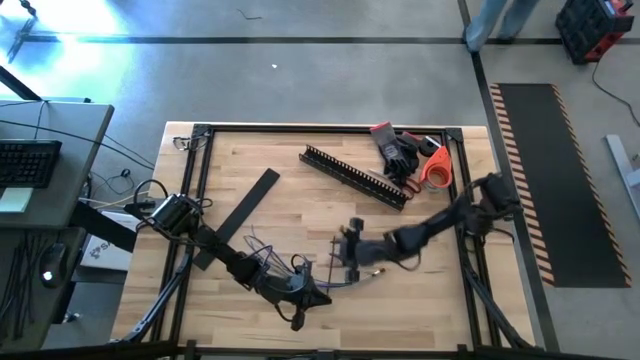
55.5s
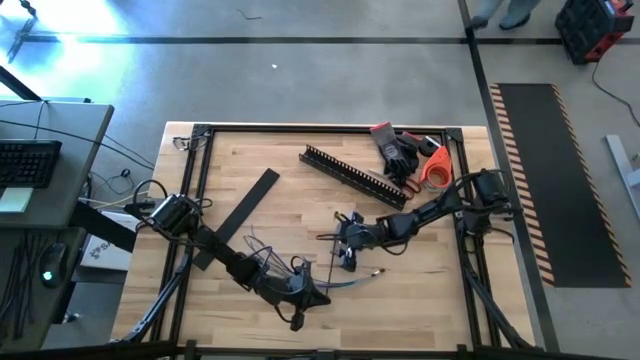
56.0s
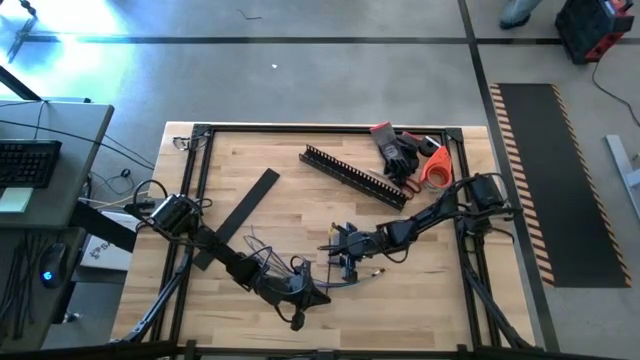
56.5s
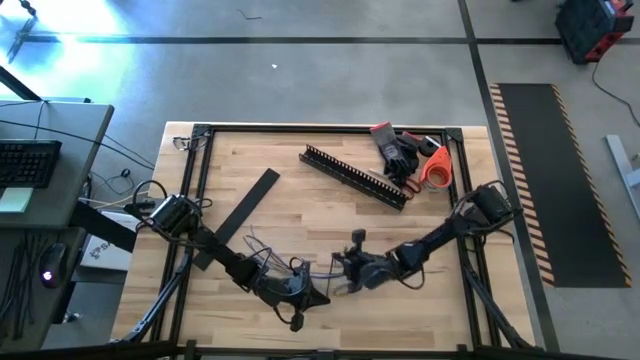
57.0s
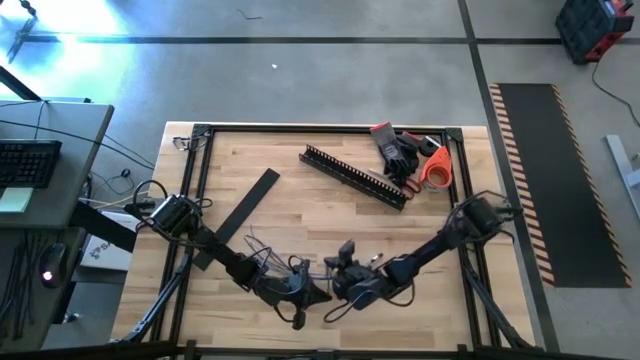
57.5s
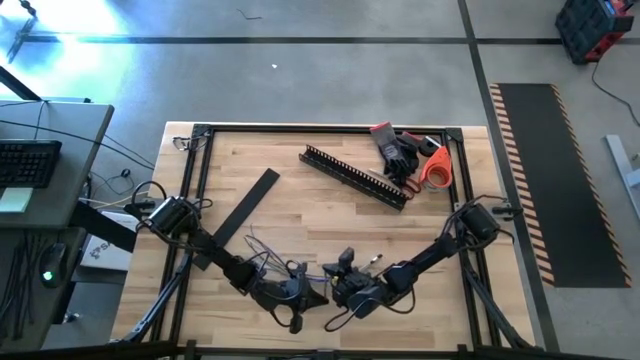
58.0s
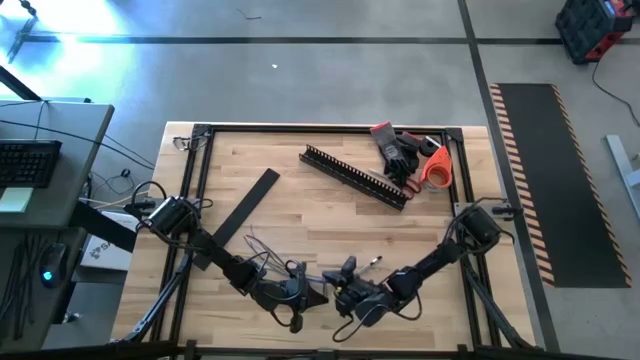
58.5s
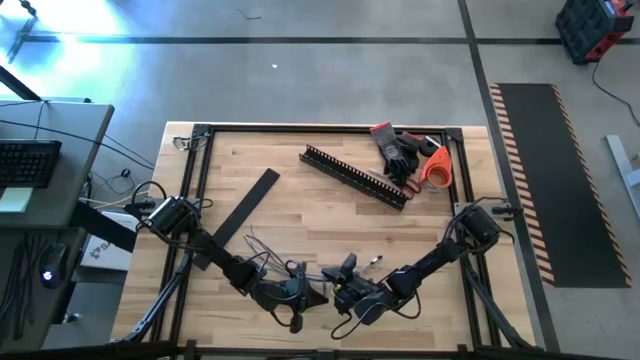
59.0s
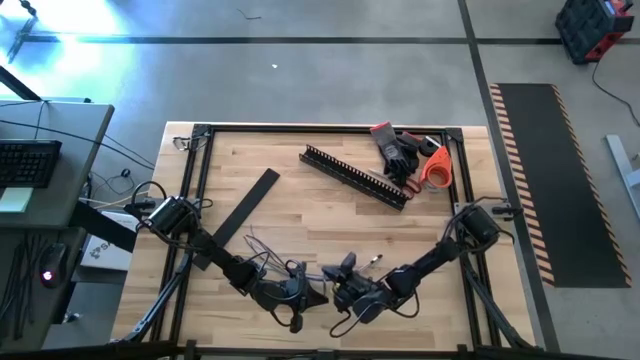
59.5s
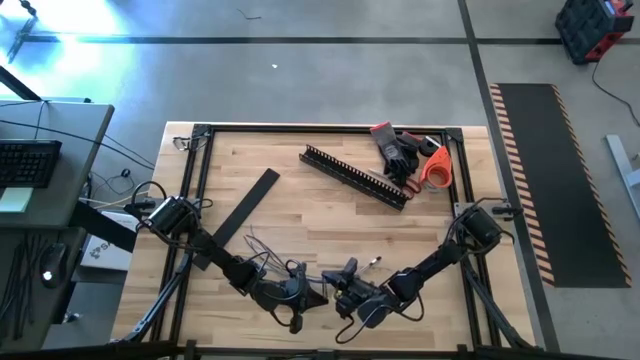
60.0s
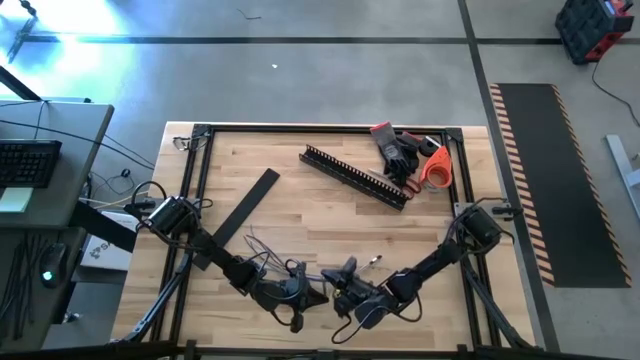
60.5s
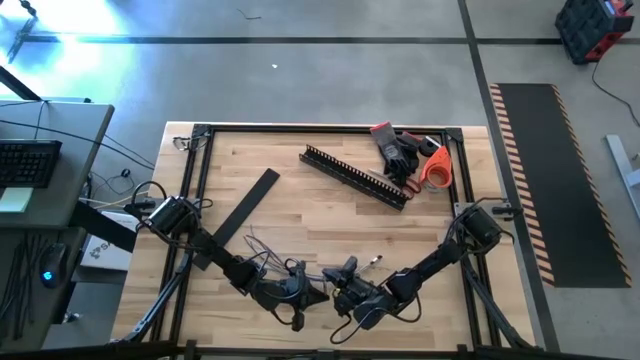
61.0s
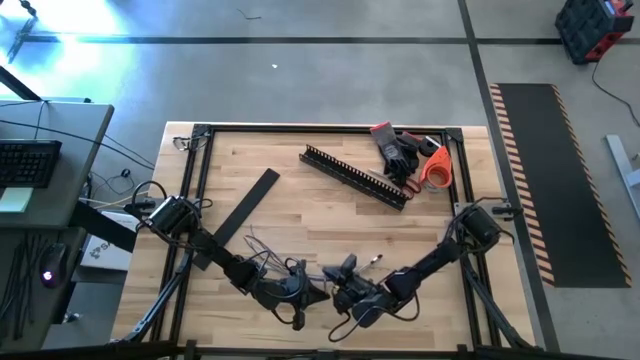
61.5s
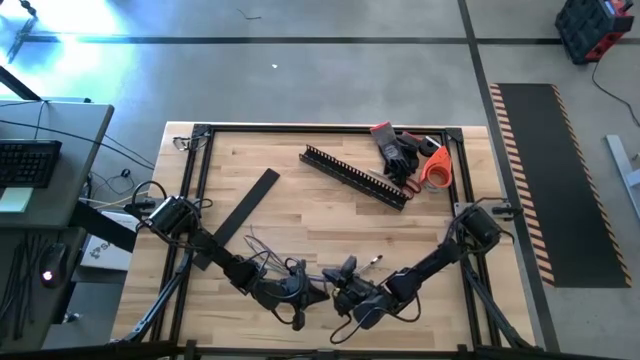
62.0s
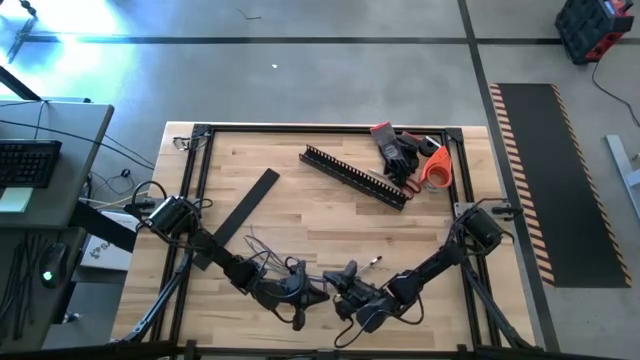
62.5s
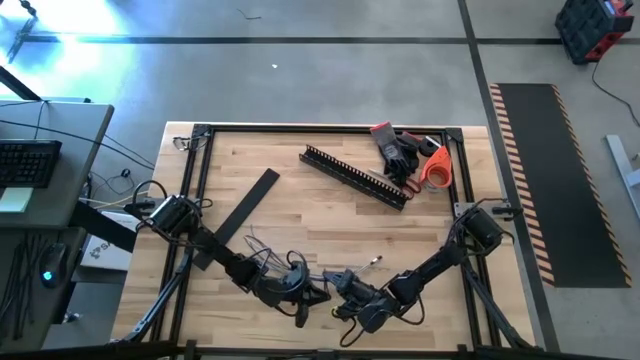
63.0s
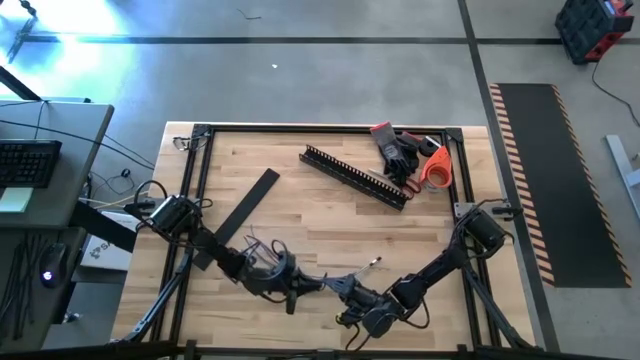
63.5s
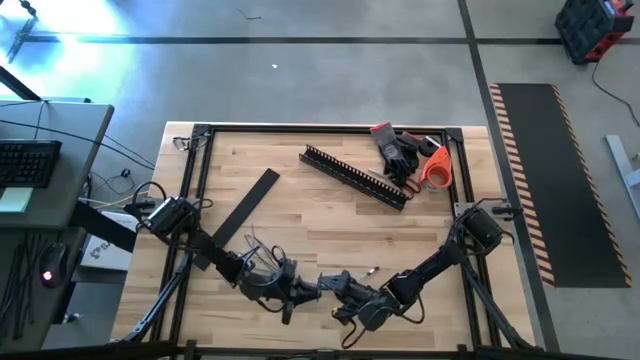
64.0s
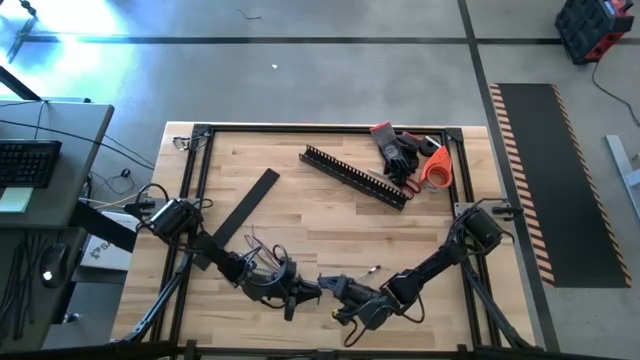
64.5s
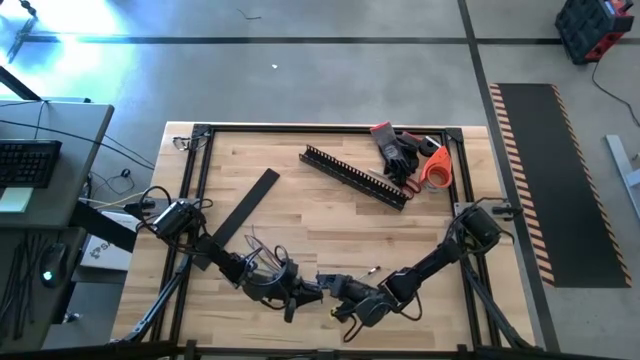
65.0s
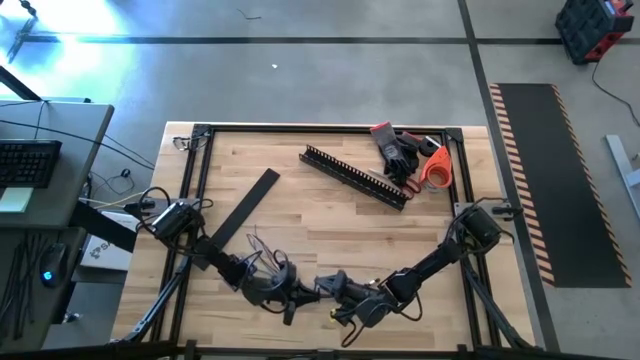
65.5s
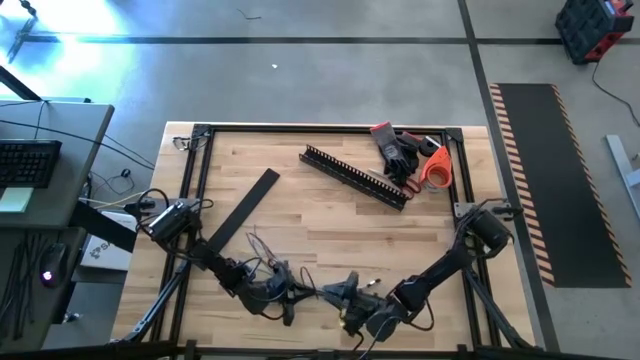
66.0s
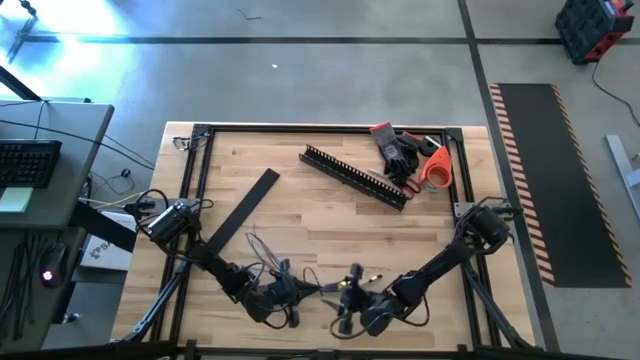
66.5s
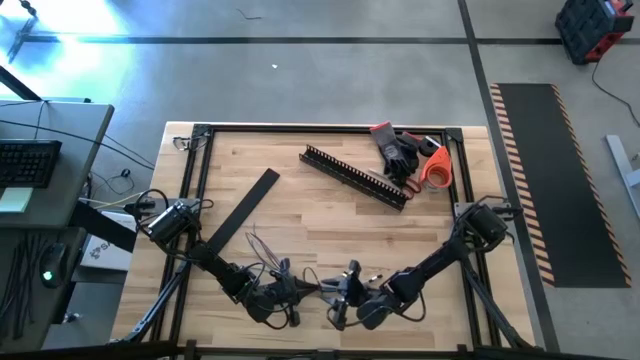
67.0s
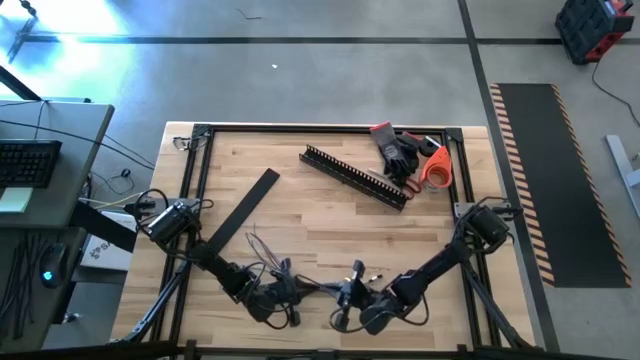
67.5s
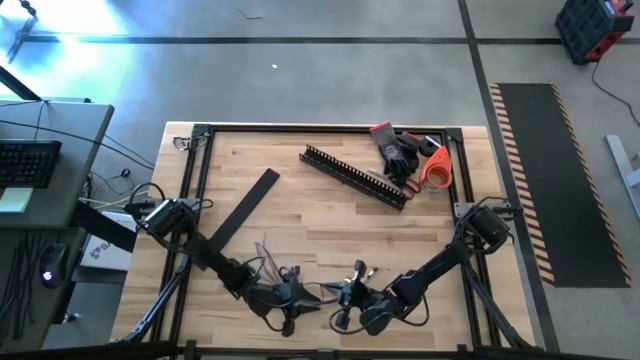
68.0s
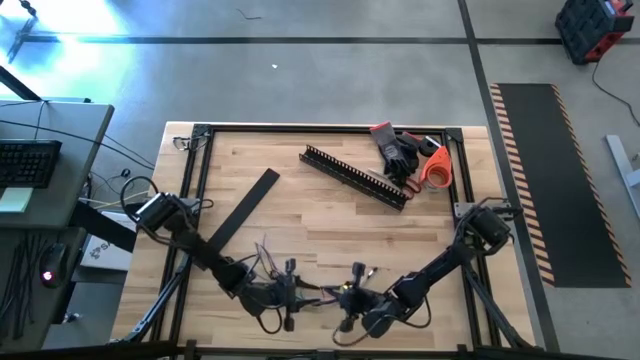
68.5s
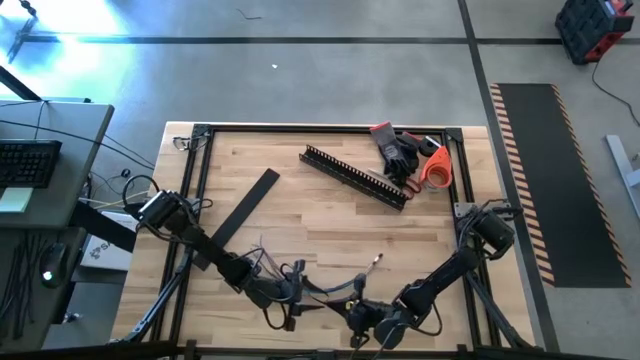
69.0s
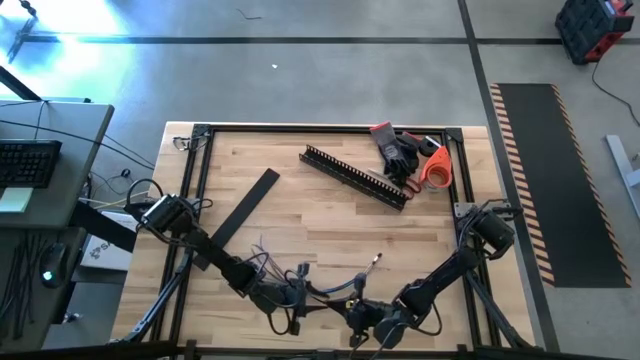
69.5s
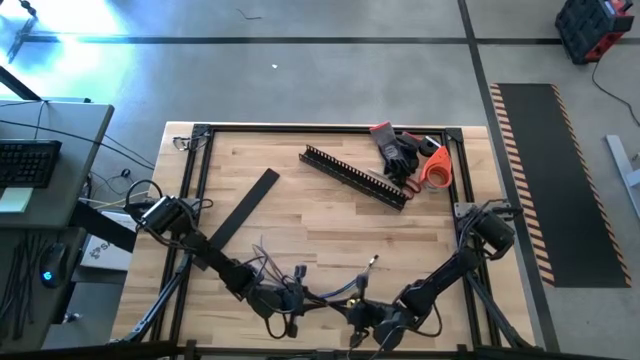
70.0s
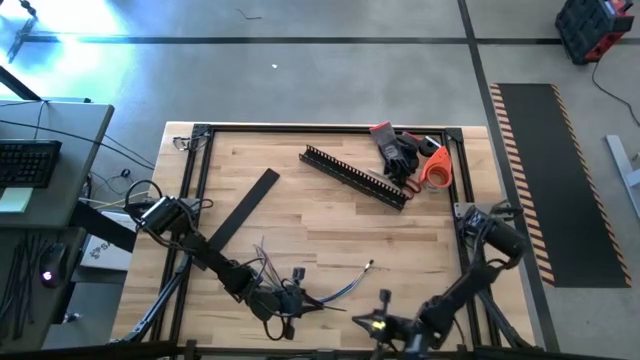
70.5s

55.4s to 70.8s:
Task: Ziptie cables
Wrap the black zip tie on the cables
